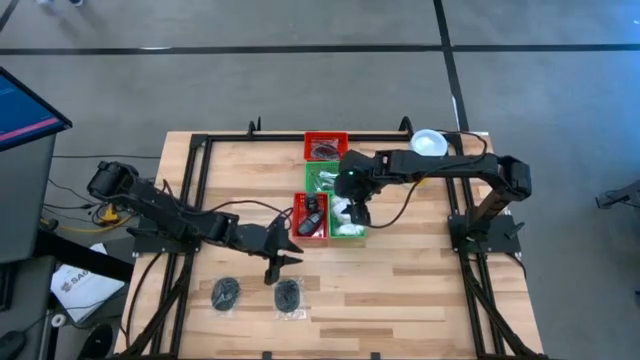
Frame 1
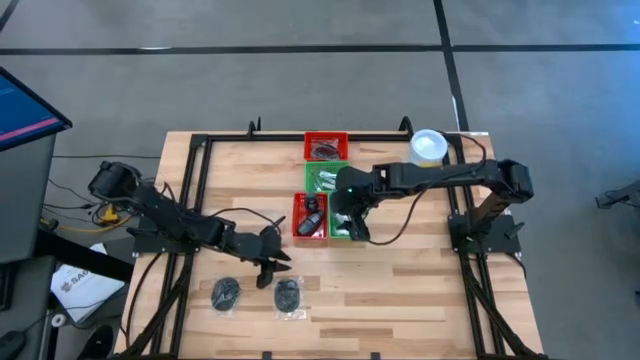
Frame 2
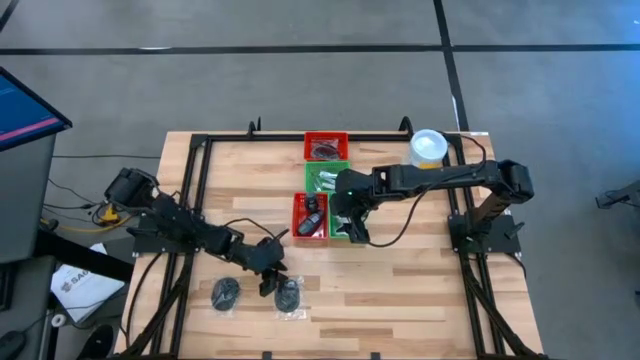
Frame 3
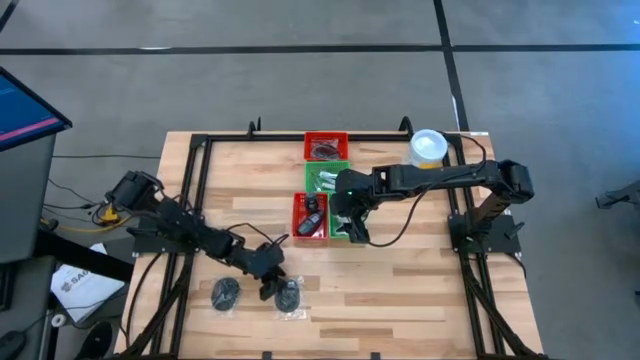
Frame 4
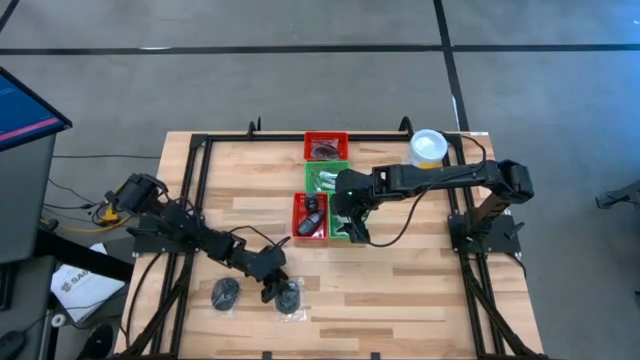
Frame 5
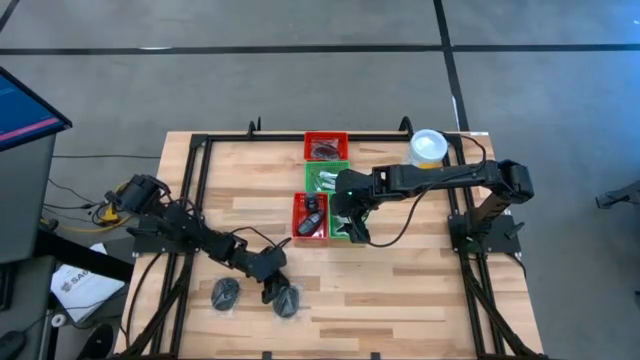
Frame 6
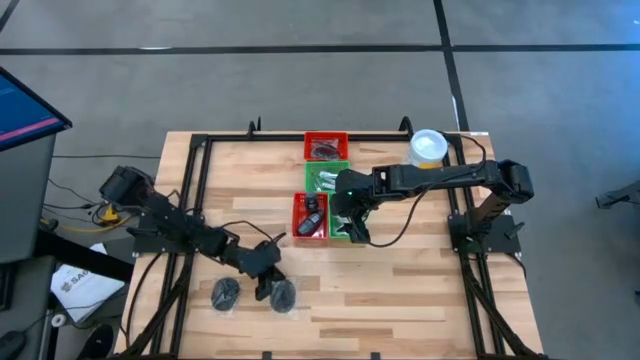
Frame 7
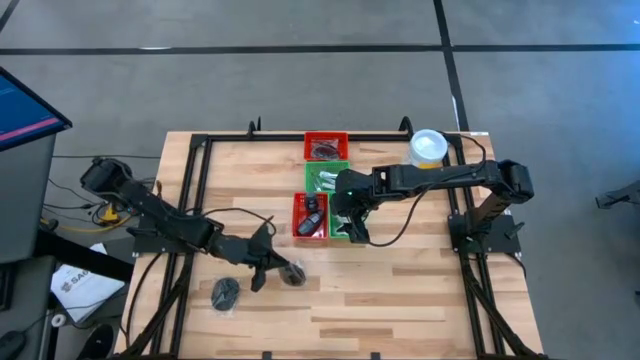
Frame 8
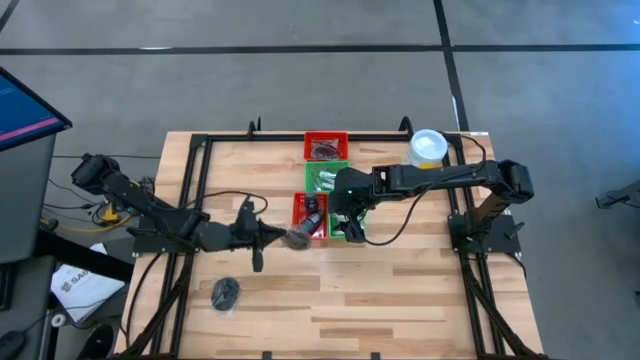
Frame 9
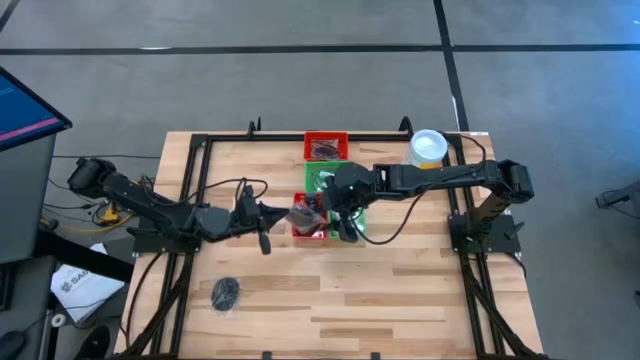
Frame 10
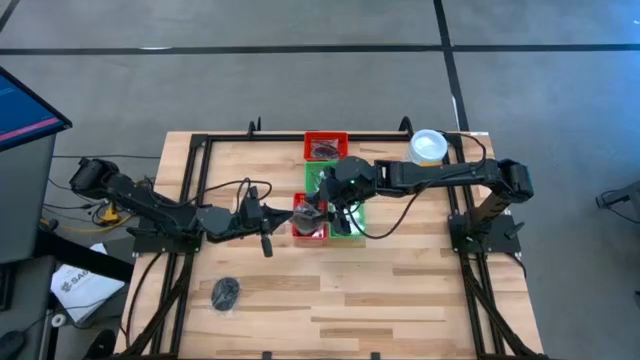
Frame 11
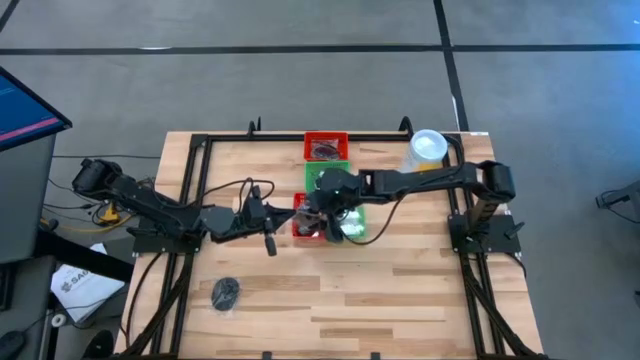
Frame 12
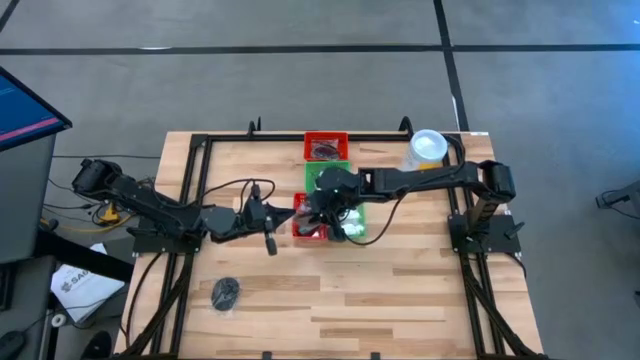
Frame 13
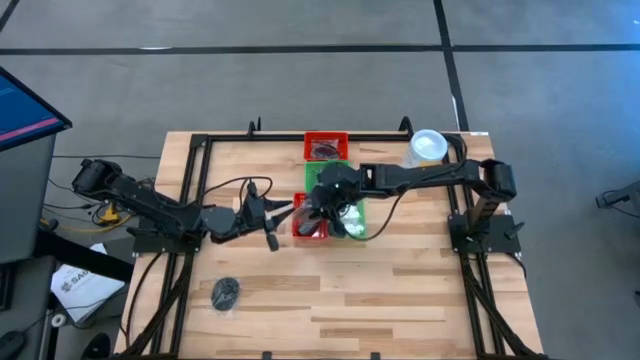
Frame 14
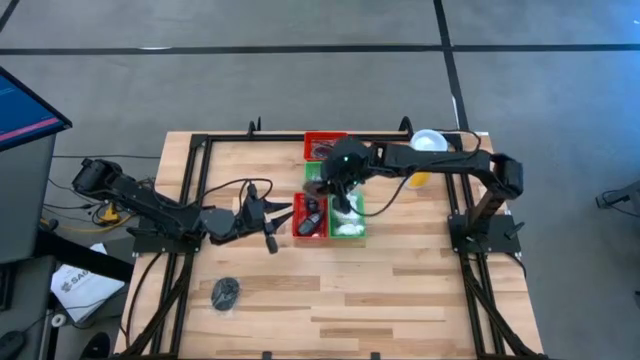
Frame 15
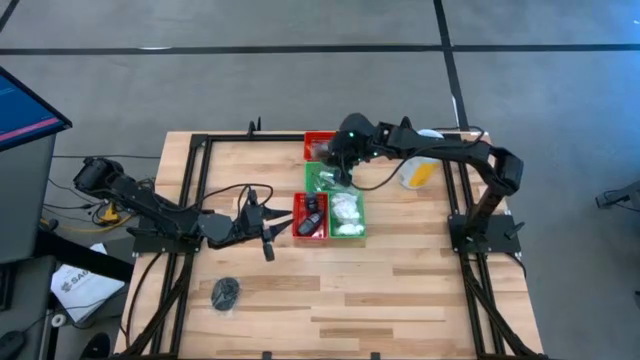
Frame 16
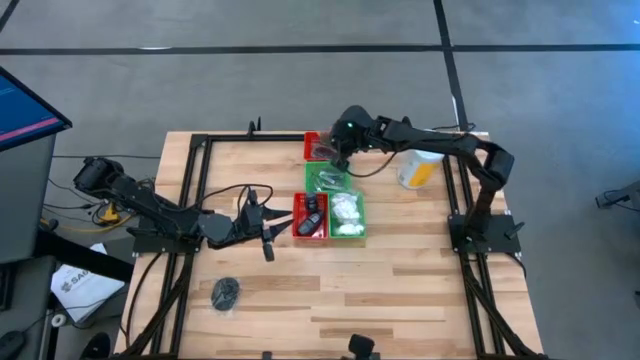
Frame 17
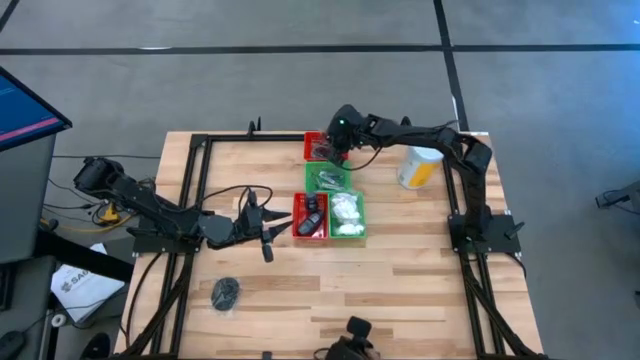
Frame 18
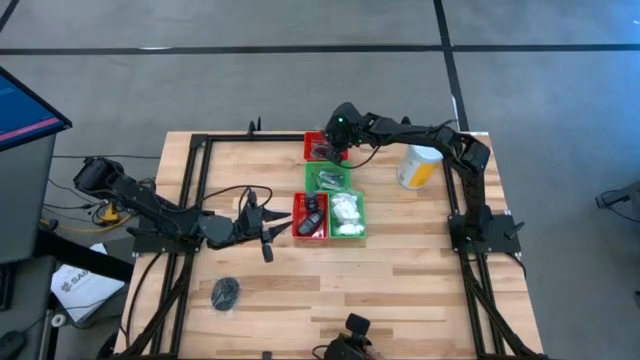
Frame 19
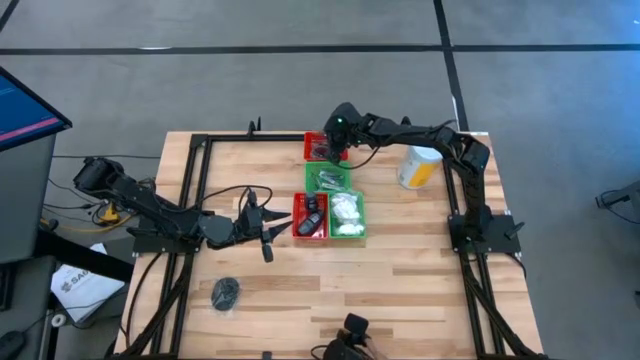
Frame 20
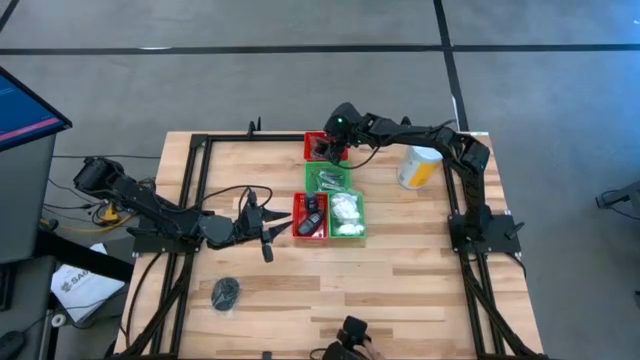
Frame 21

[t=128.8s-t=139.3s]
Task: Pick & Place Travel size toiletries
Put the black hairbrush into the top red bin

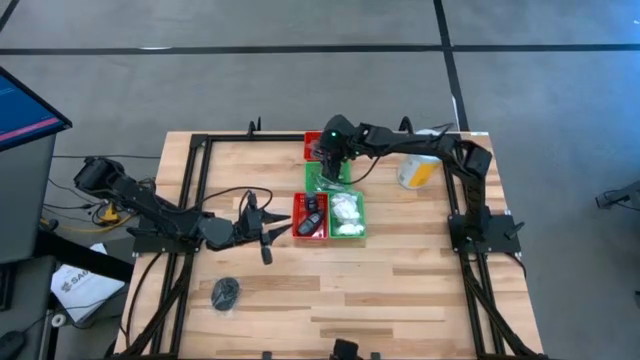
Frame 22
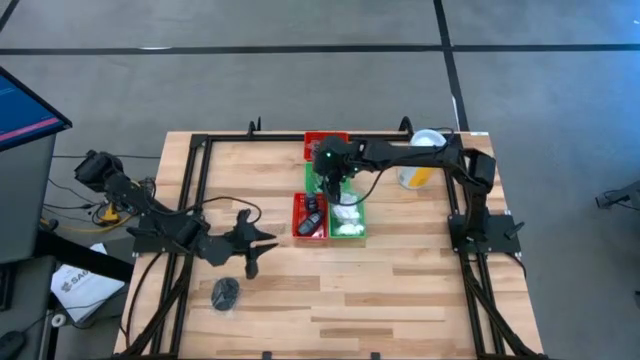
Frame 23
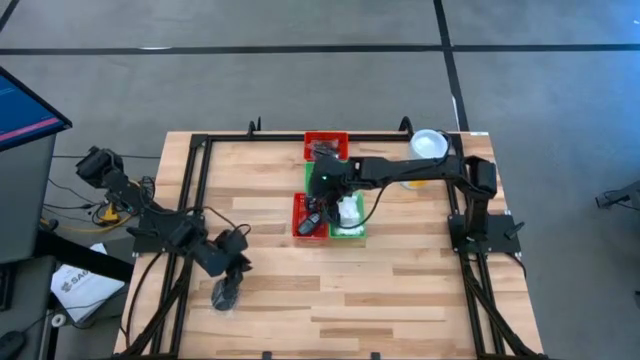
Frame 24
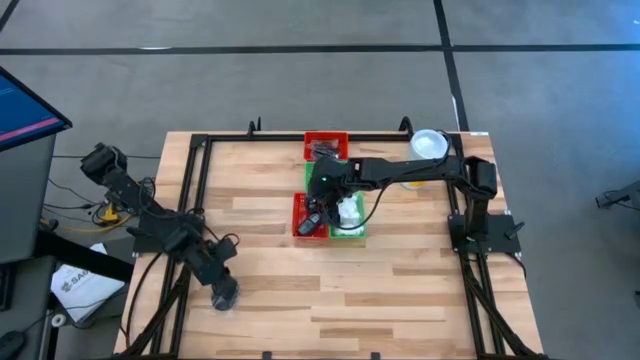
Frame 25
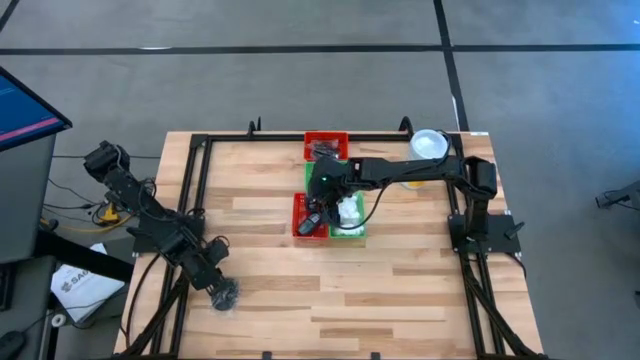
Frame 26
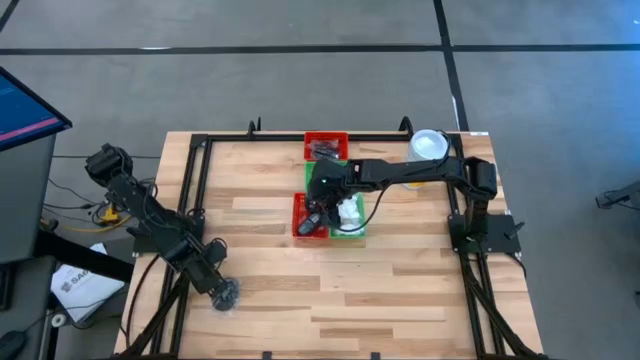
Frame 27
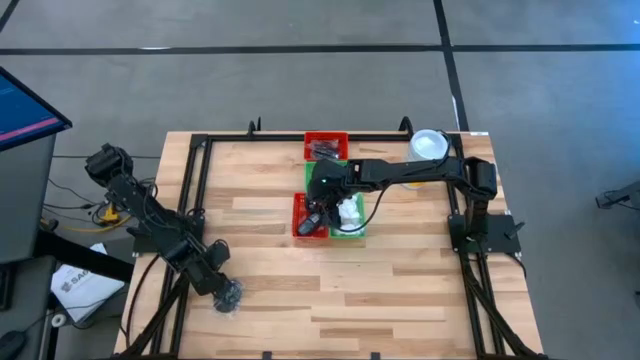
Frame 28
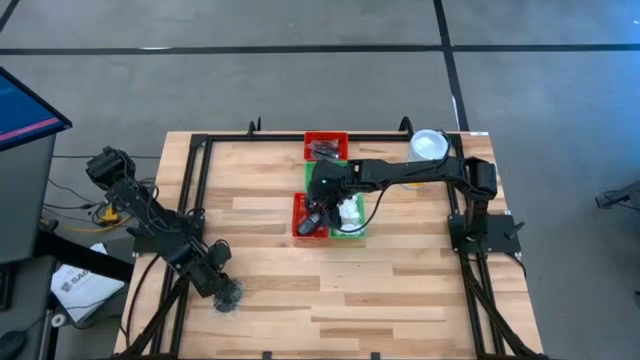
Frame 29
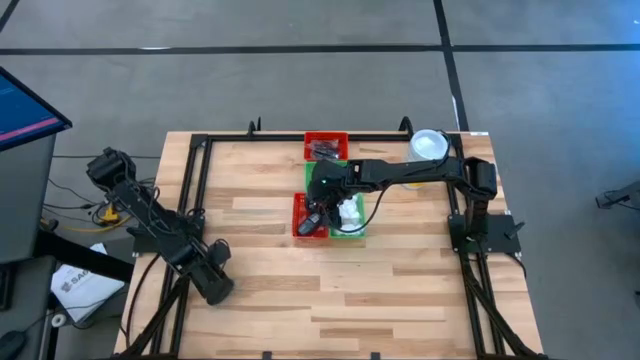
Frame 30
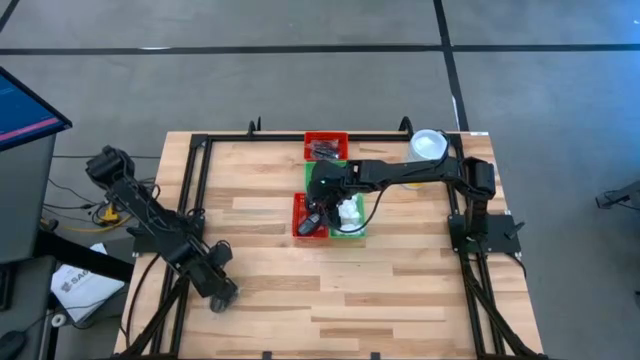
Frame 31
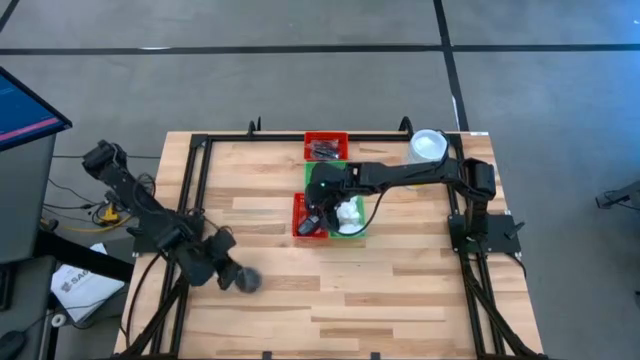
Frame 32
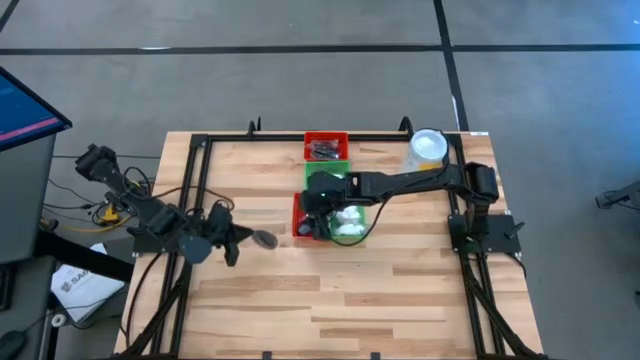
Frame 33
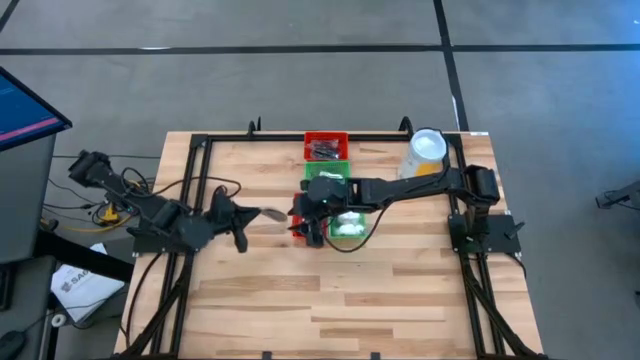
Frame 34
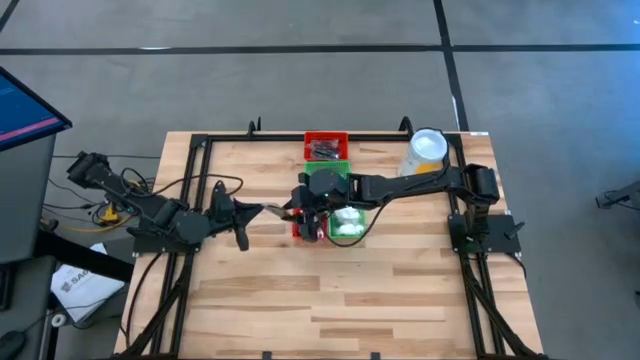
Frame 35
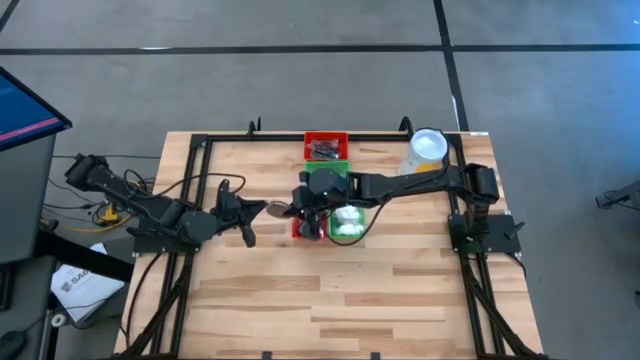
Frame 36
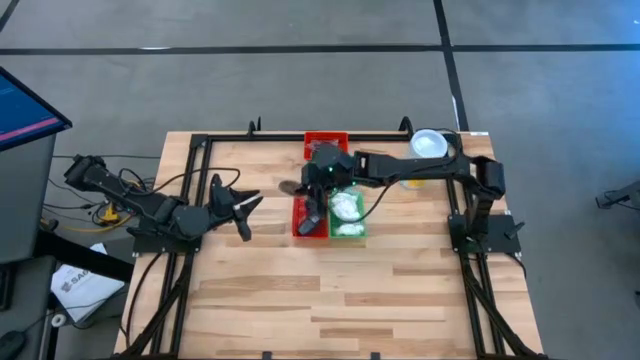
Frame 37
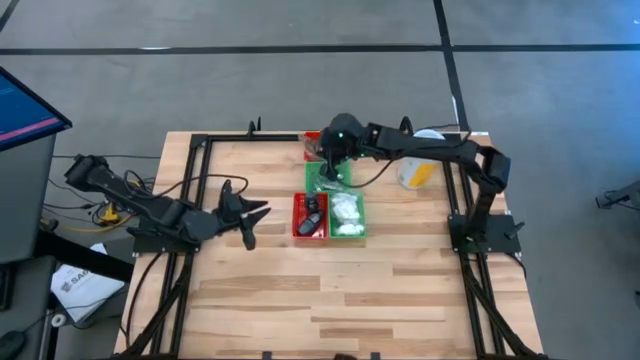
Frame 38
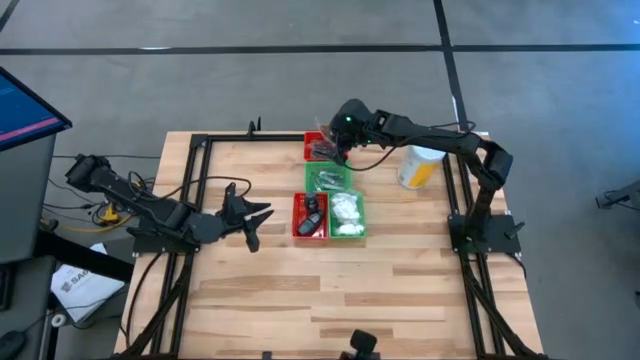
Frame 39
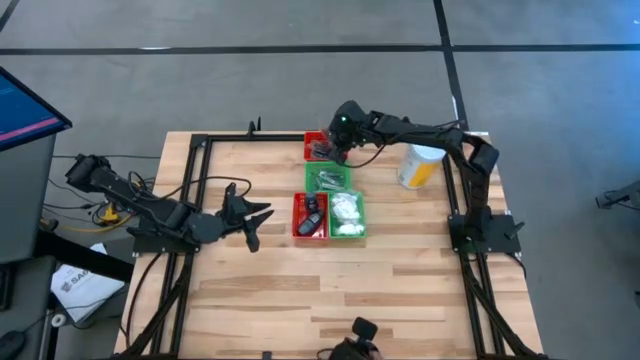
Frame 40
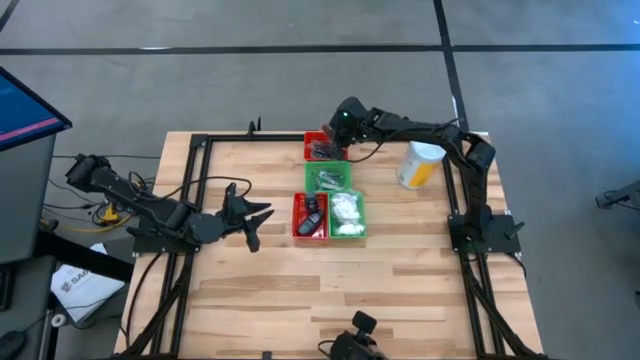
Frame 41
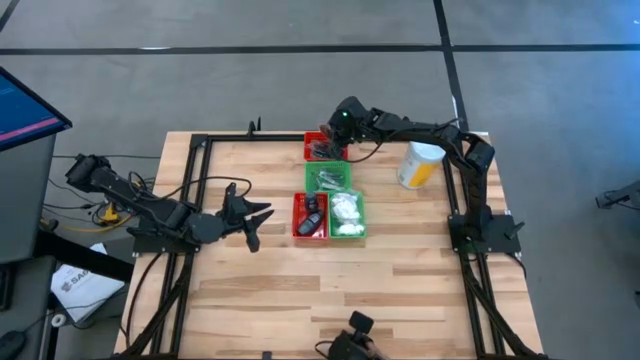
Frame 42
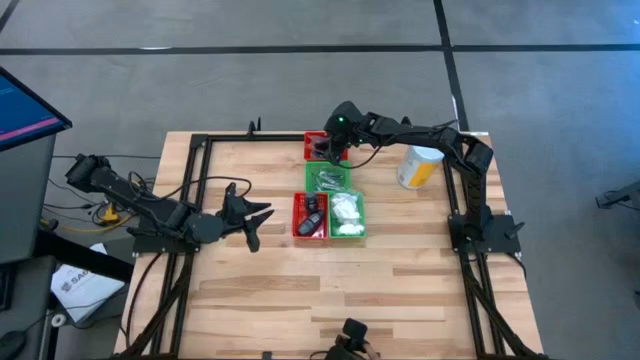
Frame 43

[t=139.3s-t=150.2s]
Put the black hairbrush into the top red bin

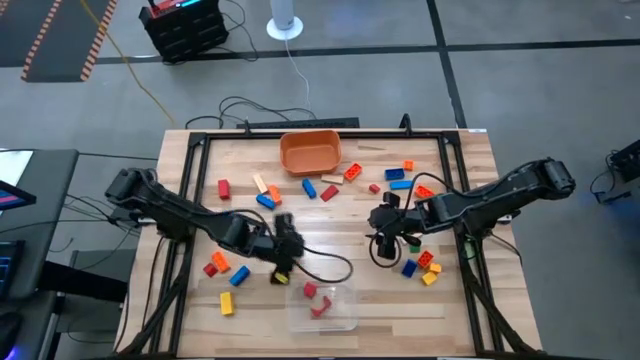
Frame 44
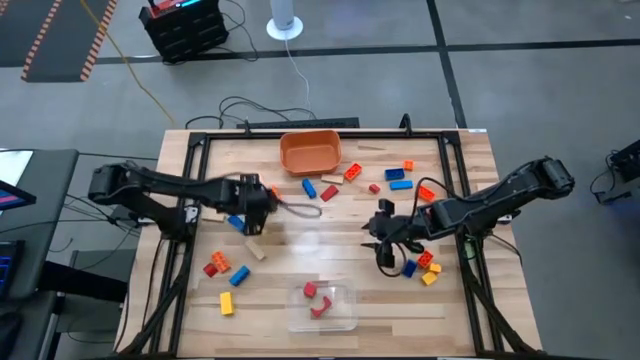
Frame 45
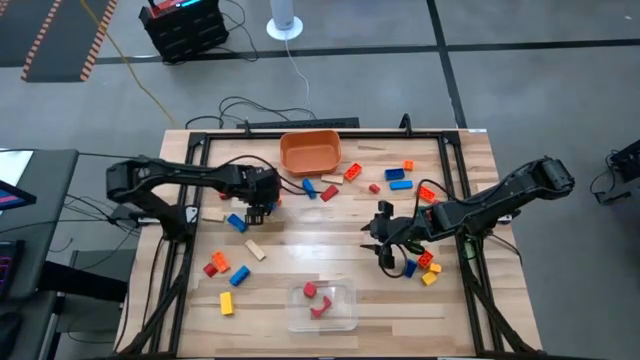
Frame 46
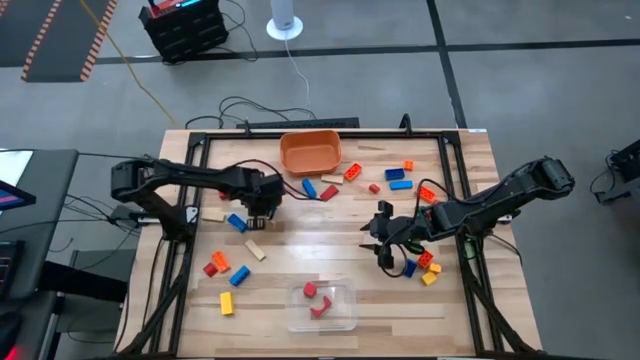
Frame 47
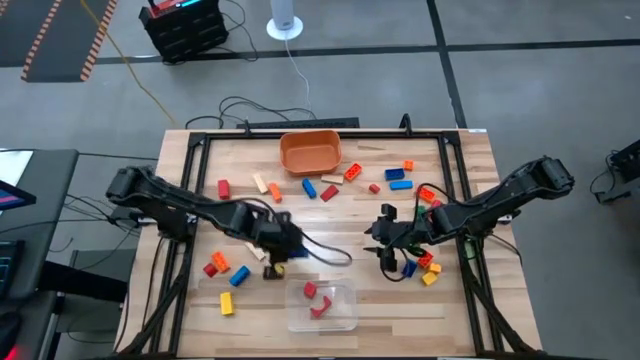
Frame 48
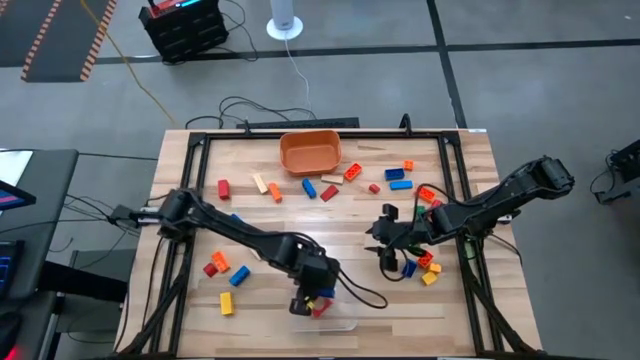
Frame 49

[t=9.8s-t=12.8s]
Task: Sort blocks by size
Put the large blue game piece into the transparent bin
